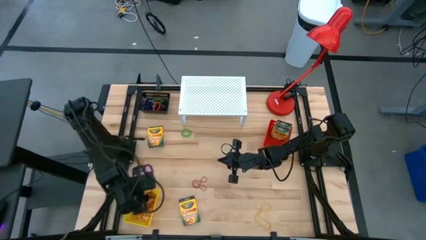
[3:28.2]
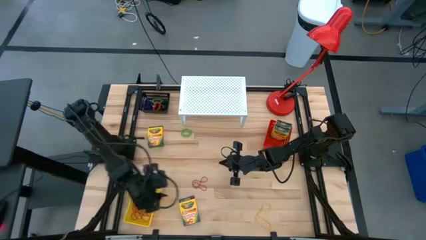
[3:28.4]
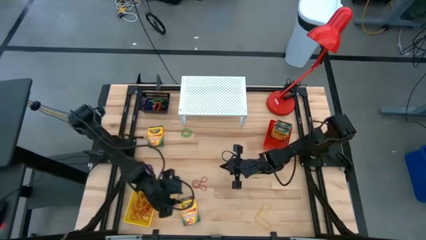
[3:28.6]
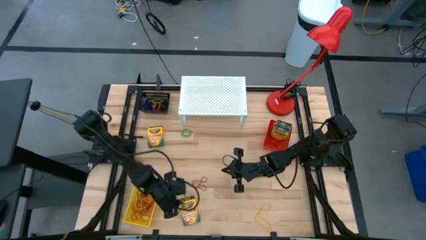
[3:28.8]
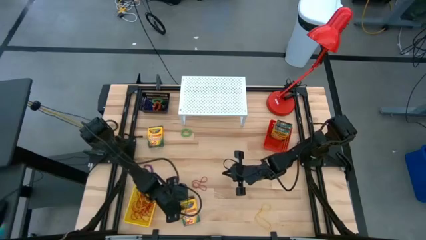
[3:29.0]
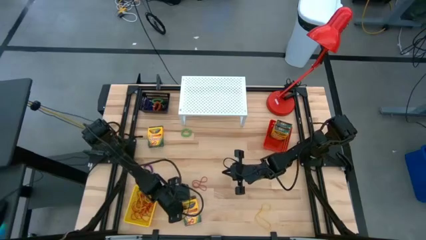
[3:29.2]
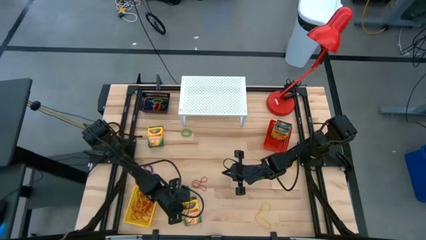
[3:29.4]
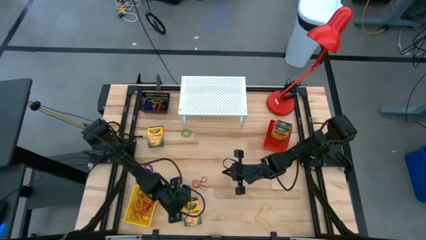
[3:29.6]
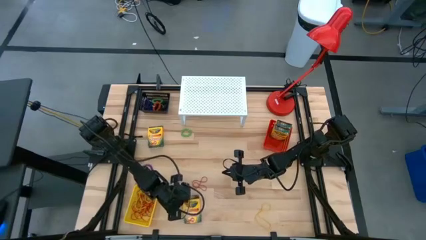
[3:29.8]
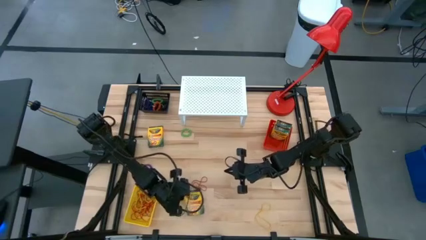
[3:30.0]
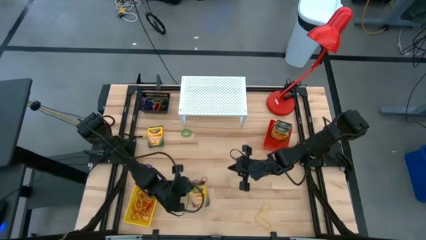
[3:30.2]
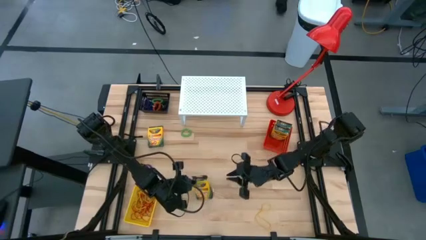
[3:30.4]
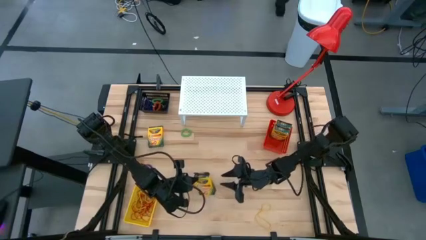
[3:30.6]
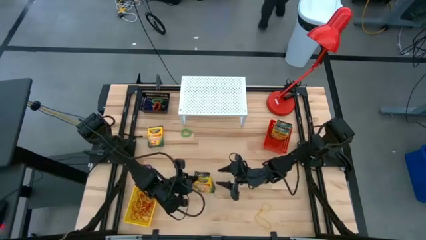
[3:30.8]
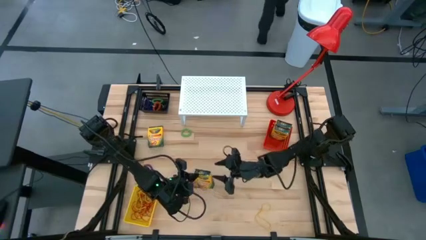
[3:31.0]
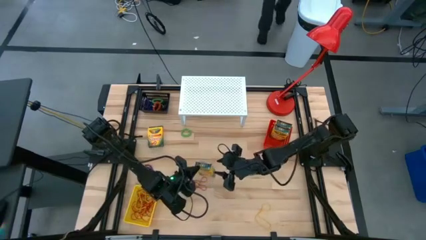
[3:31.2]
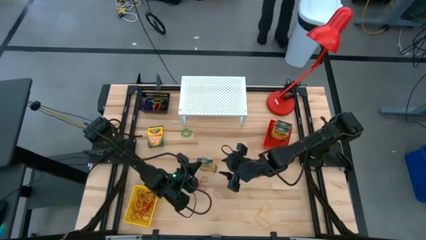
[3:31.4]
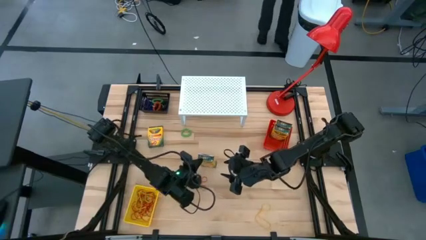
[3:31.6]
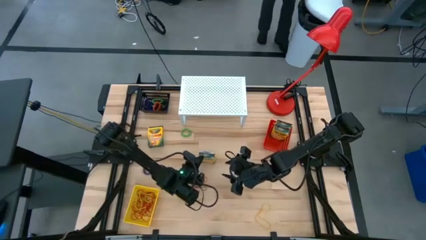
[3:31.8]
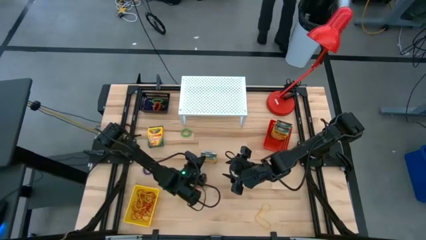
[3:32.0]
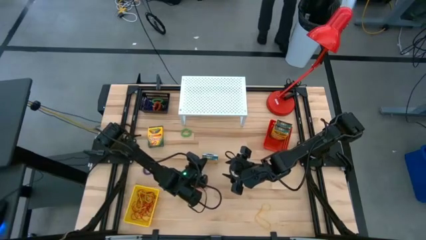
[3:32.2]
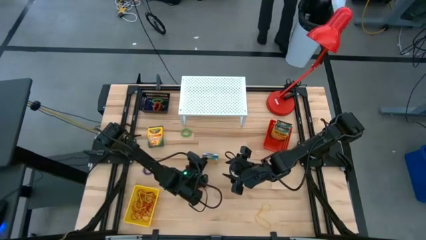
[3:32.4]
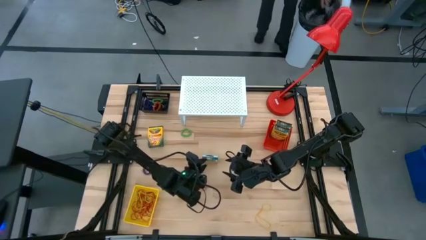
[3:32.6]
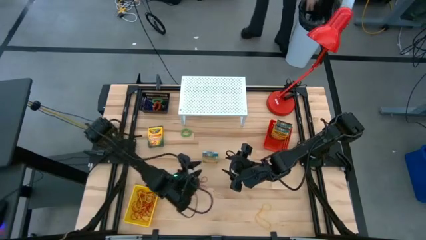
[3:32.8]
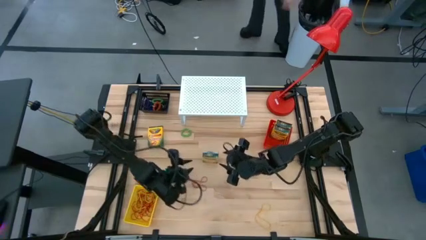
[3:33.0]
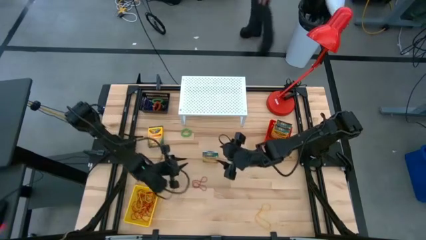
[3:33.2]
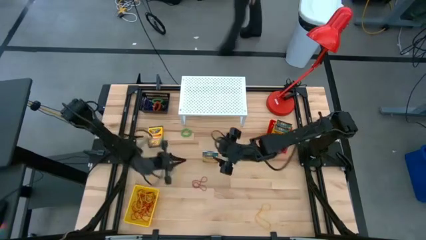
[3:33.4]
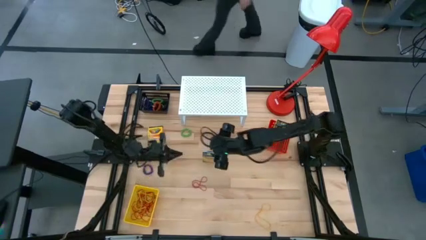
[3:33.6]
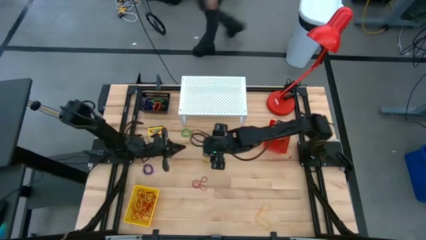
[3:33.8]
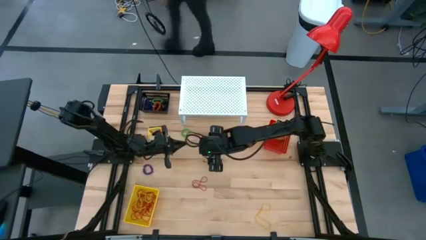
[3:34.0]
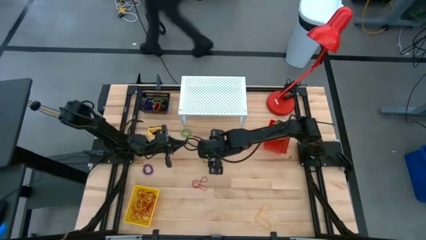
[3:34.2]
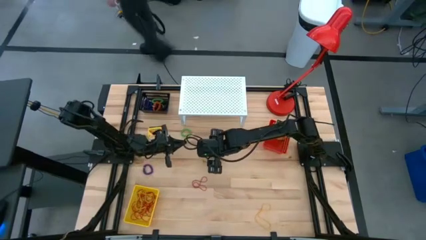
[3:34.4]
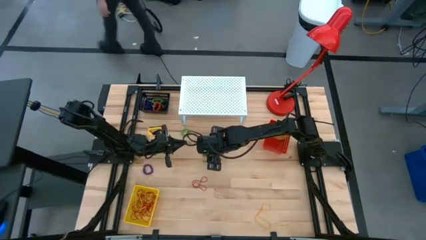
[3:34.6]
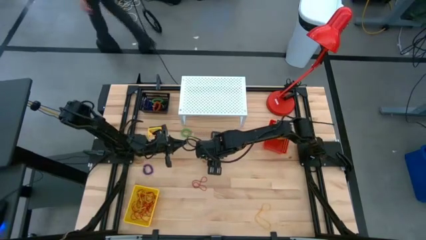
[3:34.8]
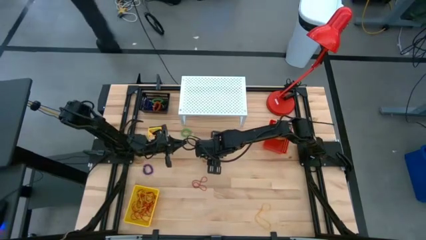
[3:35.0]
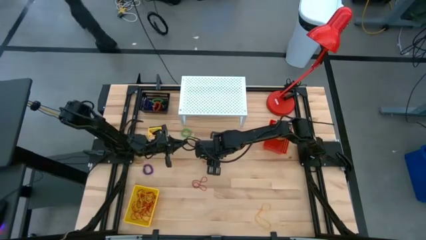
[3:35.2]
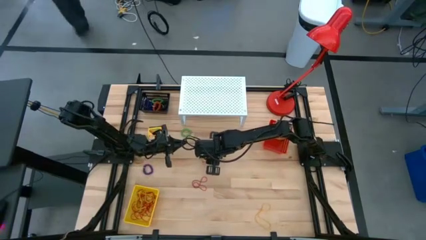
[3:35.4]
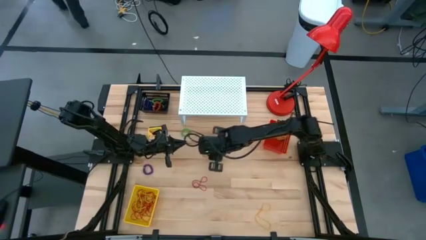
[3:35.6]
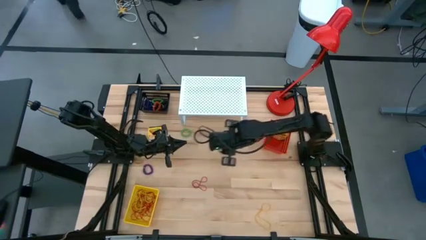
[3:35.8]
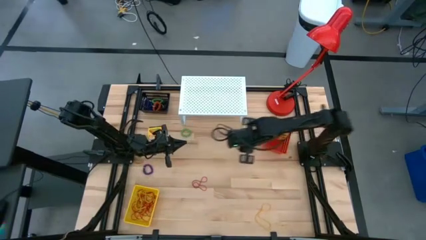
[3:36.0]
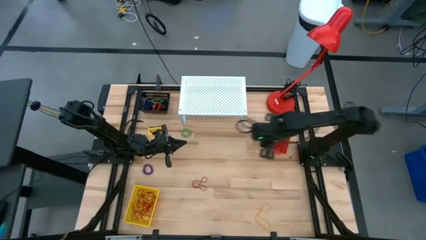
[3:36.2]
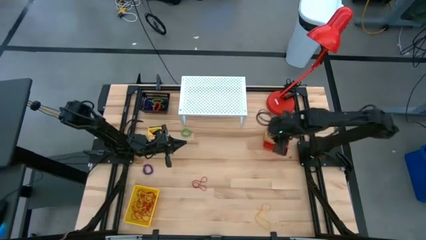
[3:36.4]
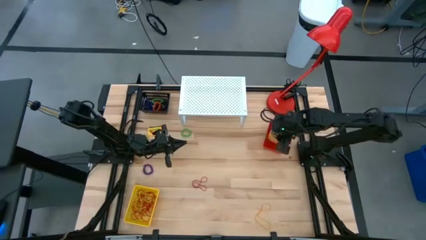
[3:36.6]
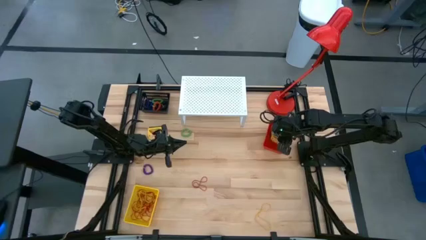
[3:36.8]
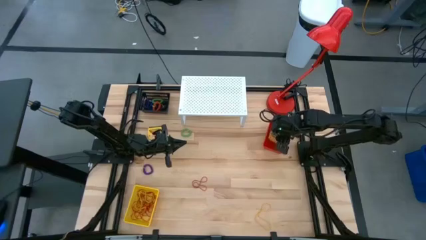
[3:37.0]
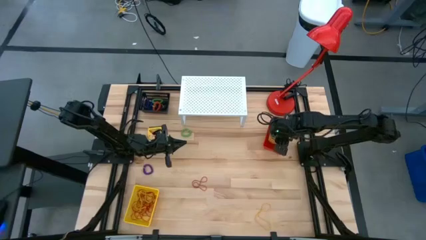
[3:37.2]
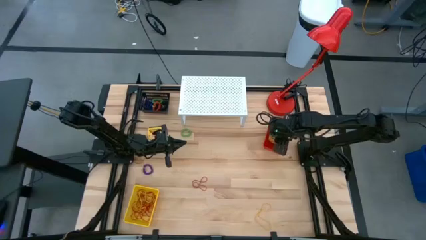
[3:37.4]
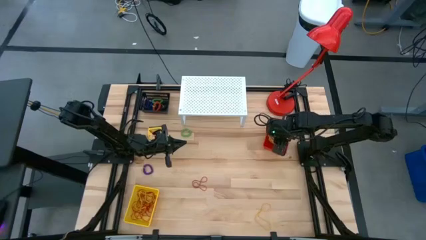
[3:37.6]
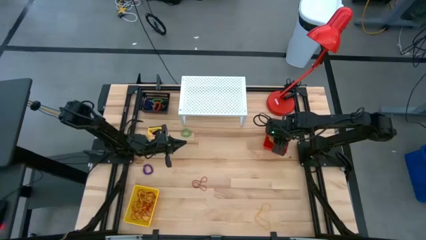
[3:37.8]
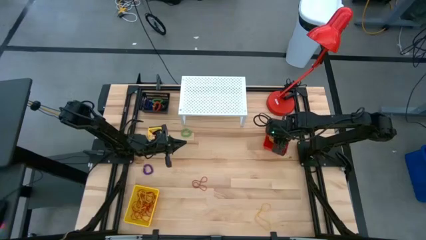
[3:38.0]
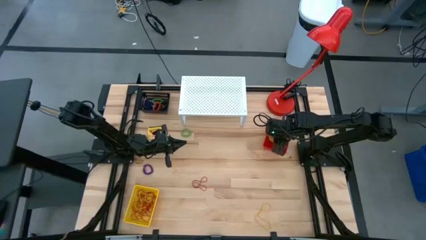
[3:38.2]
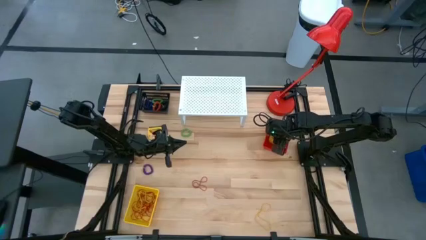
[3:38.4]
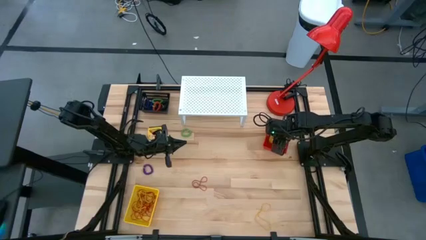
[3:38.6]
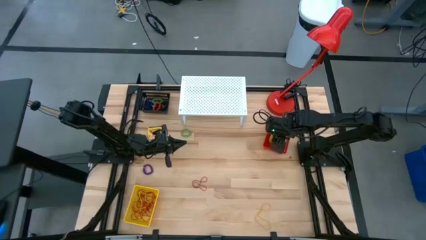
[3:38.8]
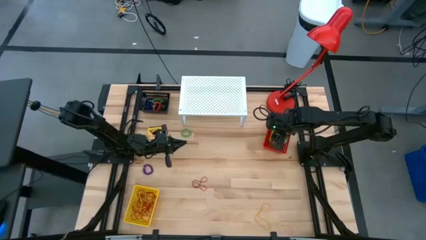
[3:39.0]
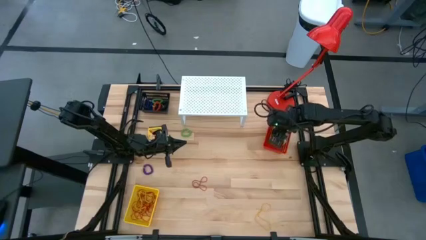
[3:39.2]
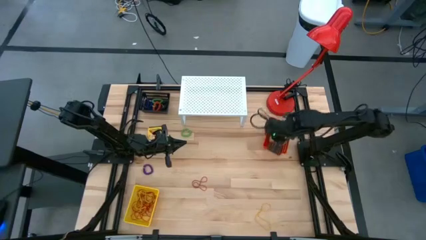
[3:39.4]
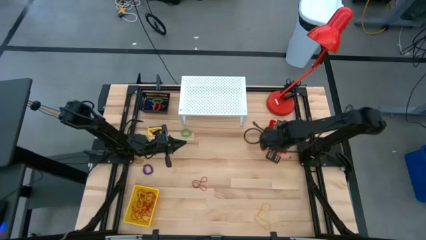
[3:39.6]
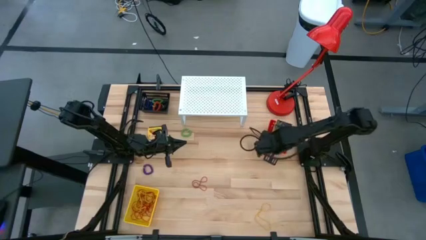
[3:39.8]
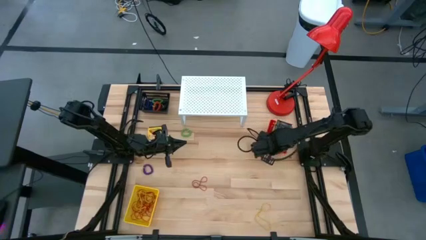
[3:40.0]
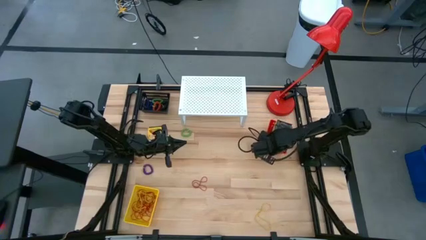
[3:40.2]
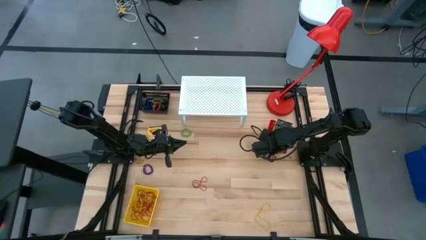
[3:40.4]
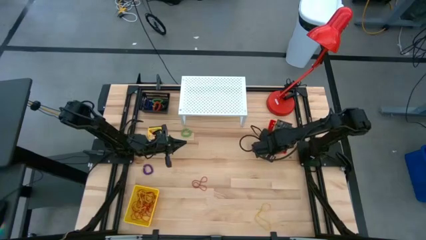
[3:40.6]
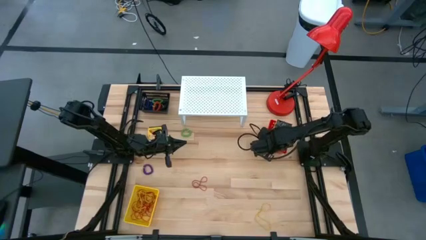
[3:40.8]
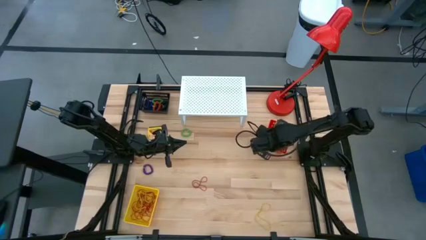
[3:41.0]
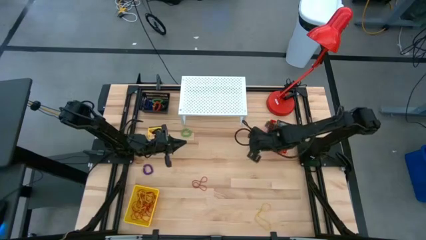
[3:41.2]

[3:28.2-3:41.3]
Task: Pick & Place Office Desk Supplies
Put the box yellow crayon into the red bin

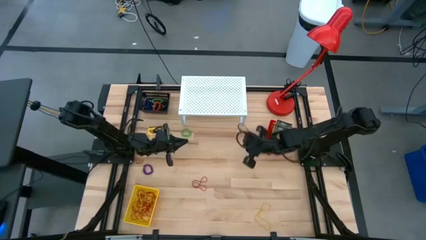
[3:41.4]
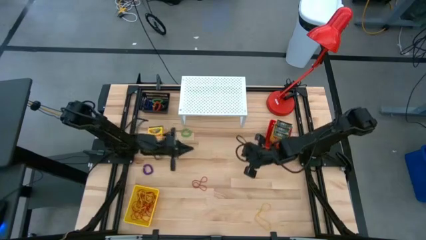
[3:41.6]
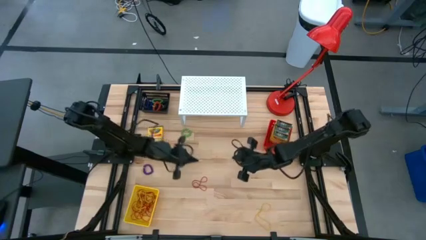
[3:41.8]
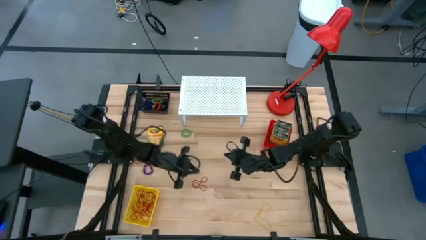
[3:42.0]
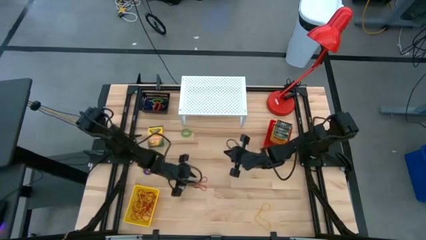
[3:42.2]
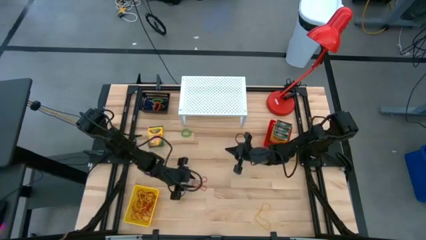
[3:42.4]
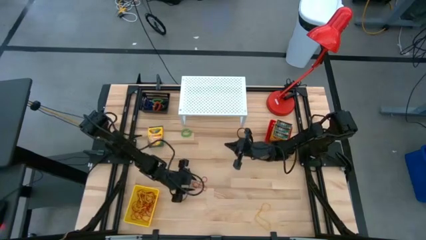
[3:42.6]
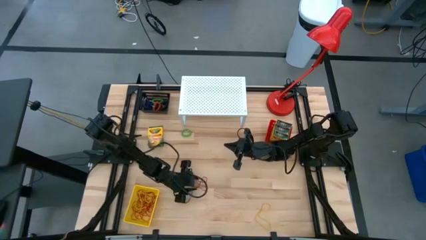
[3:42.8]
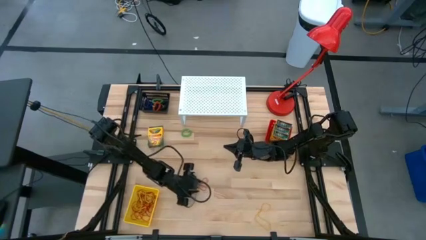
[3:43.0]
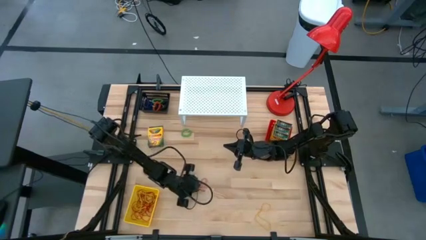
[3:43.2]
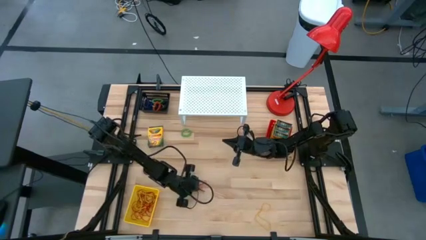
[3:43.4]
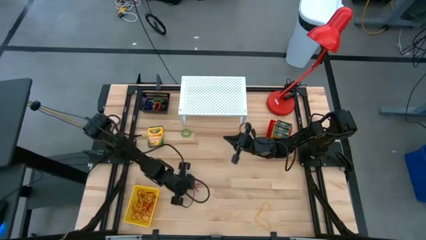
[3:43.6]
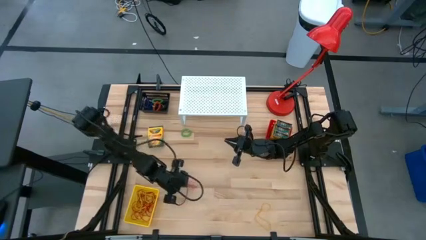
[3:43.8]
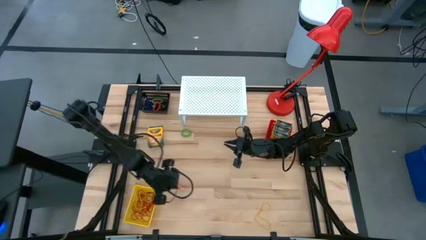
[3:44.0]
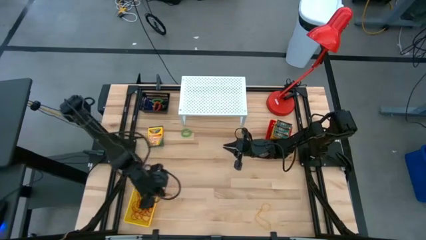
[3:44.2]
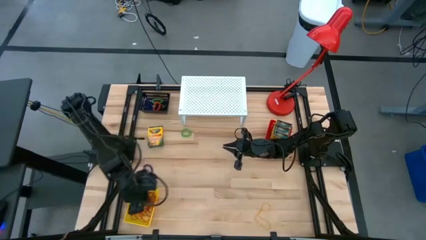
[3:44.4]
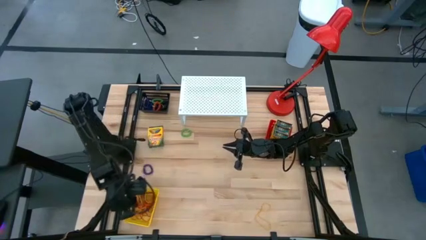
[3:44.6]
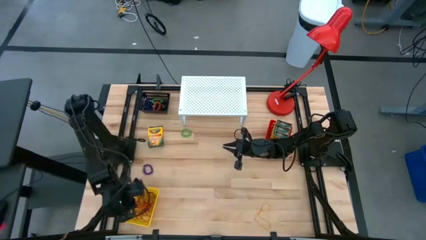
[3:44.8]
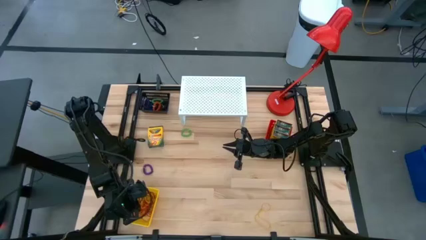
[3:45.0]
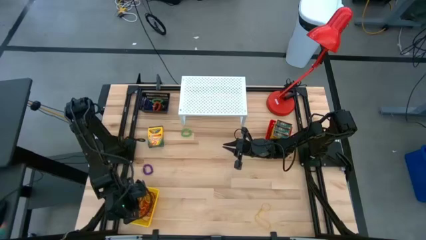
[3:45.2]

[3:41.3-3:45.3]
Put the red rubber band into the yellow bin
